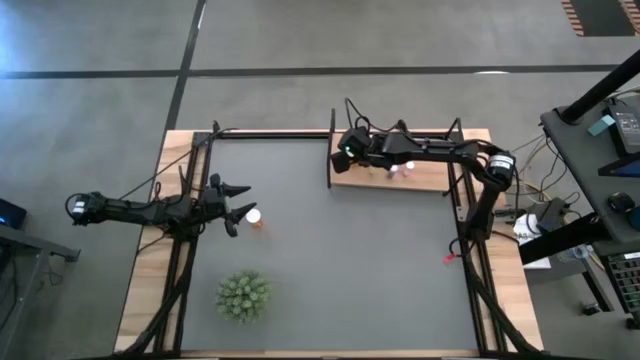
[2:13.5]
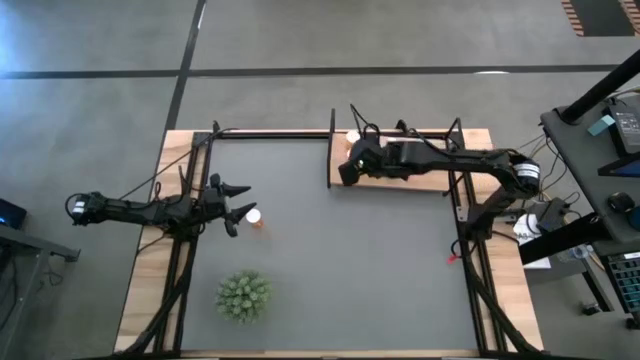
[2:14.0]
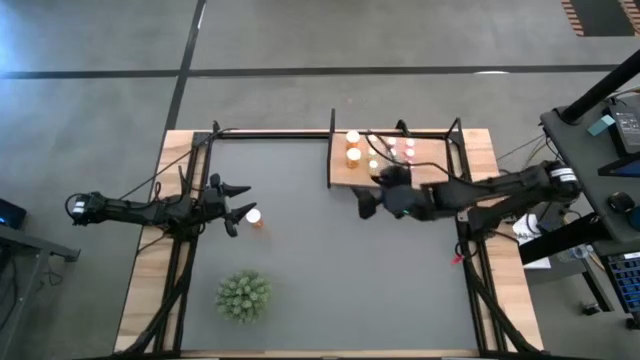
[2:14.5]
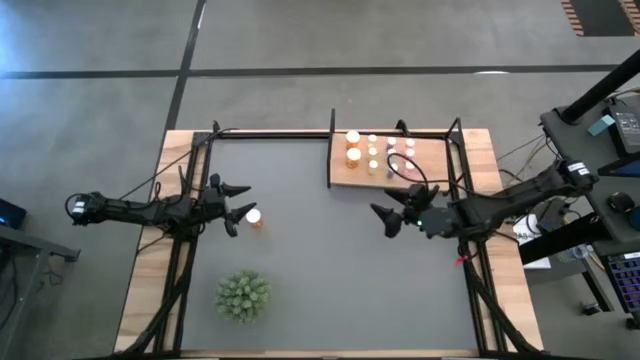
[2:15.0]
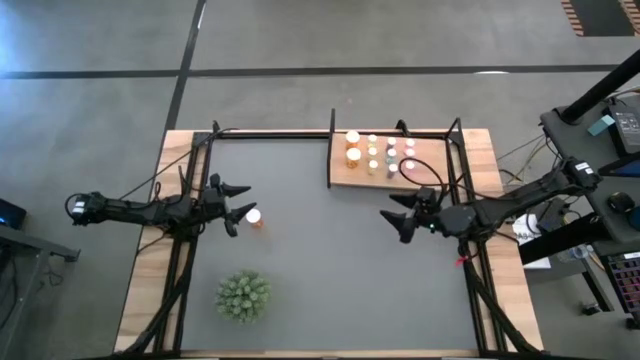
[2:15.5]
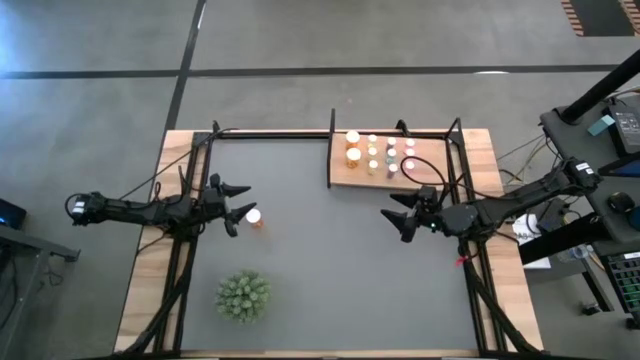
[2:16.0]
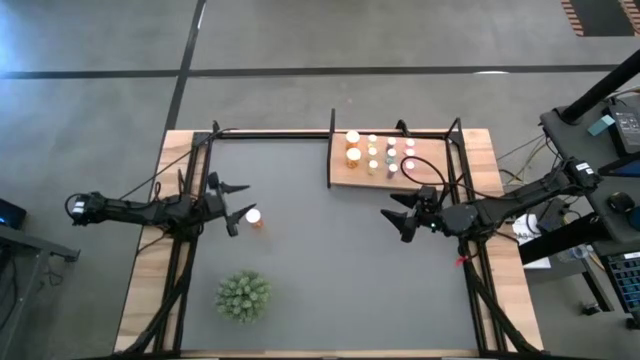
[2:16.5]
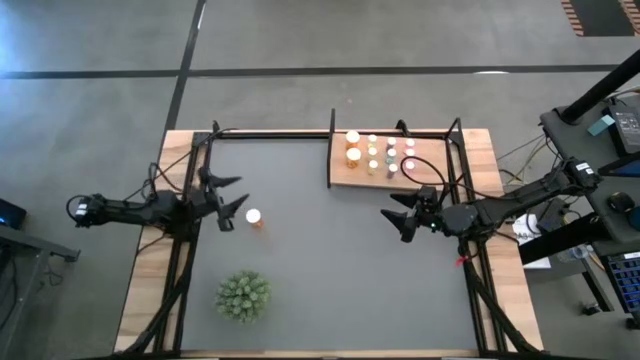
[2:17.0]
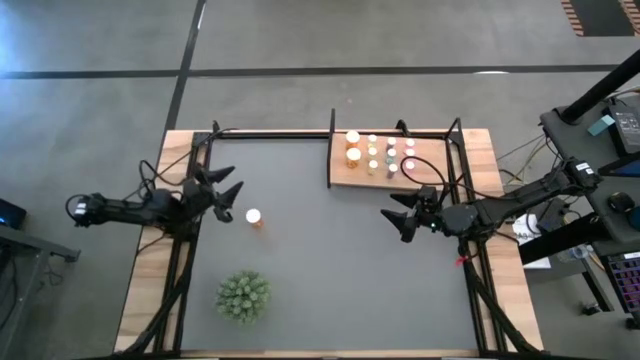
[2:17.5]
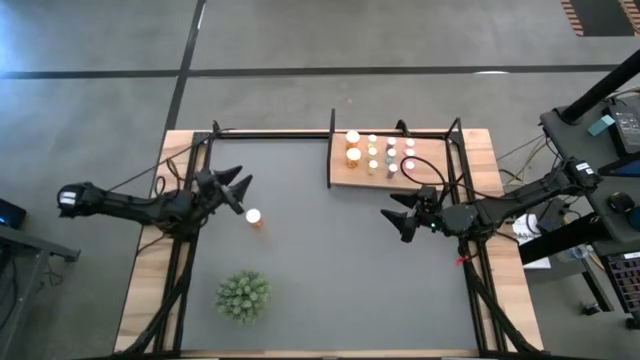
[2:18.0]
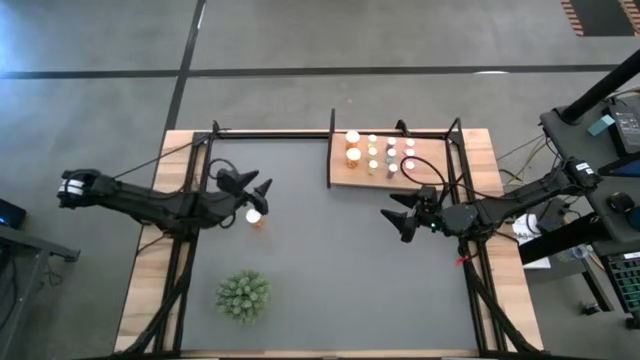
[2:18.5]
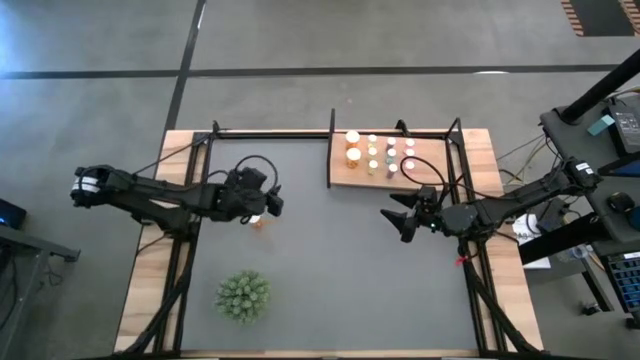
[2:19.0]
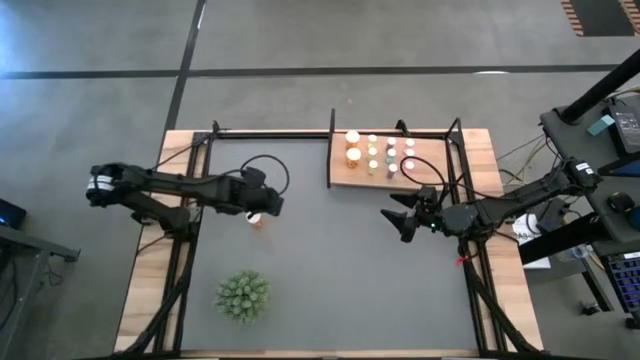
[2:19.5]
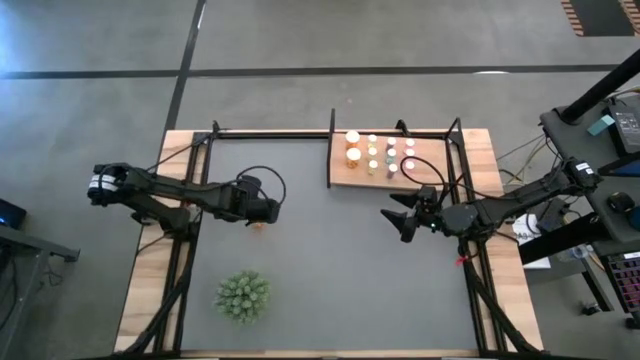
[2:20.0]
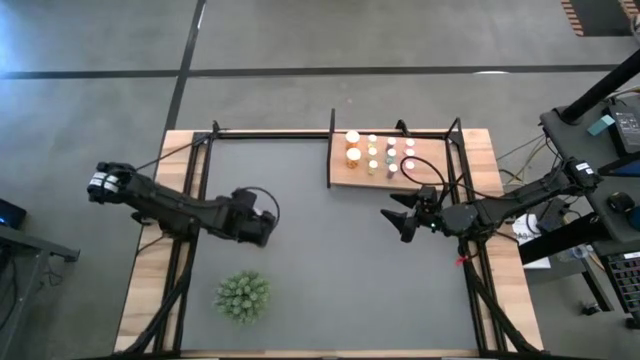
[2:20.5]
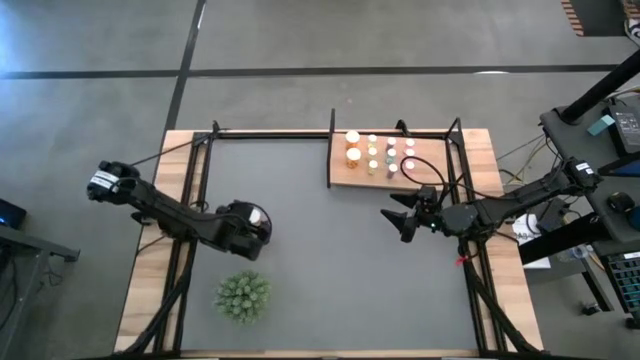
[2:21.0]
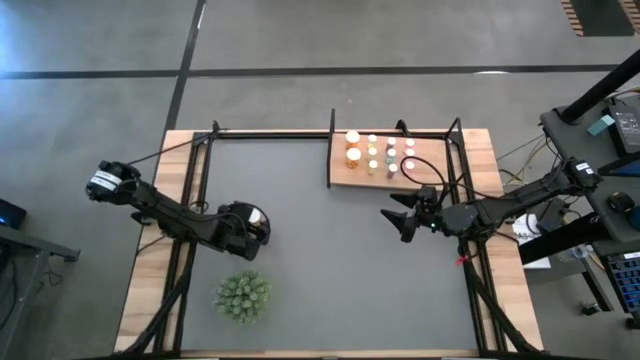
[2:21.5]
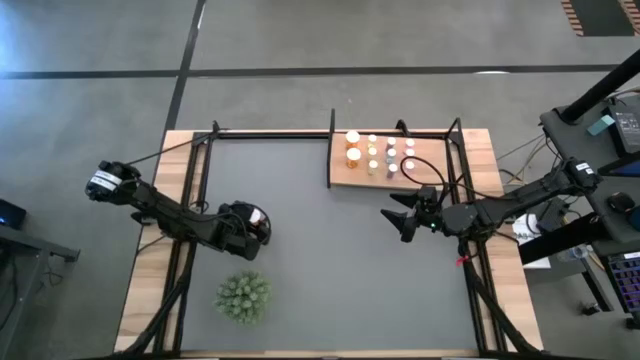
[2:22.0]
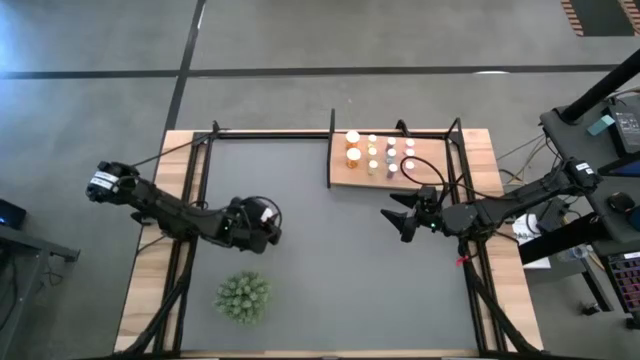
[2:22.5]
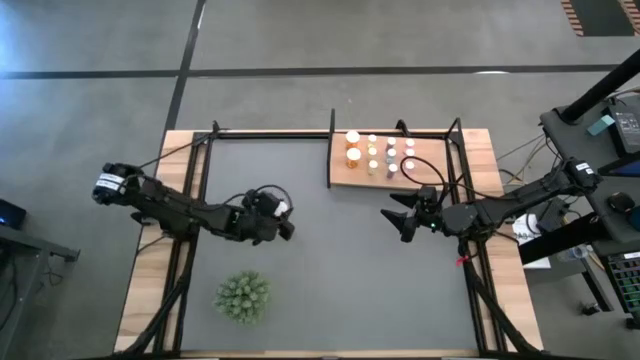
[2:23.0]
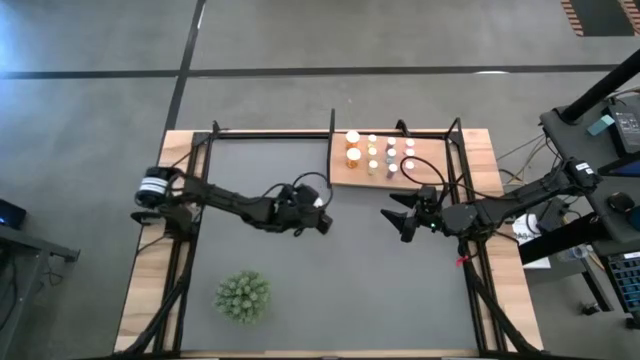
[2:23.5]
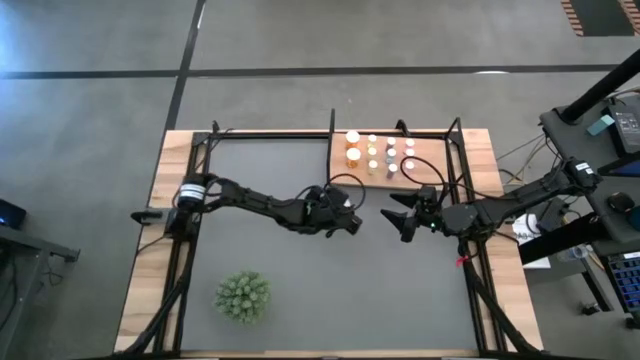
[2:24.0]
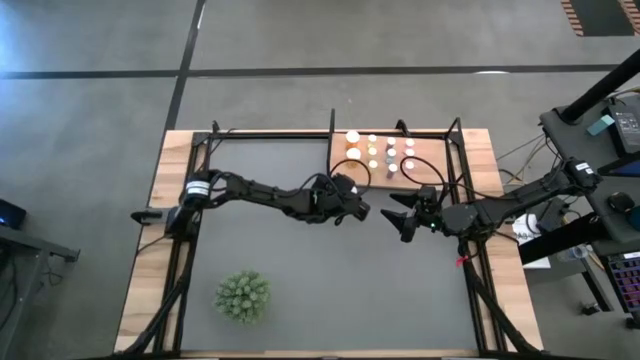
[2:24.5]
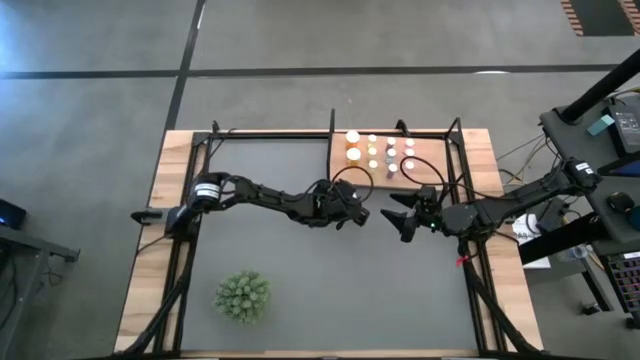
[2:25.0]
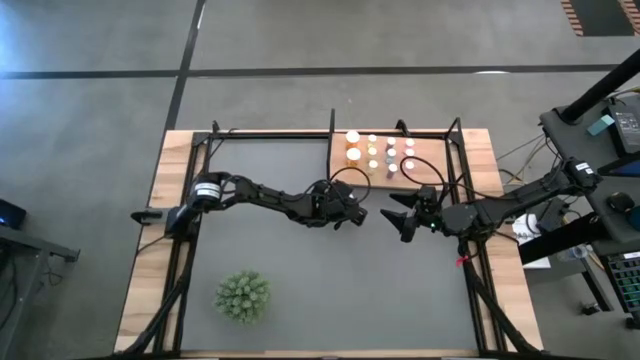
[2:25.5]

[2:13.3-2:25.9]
Task: Pick and place medicine bottles onto shelf by color
Put the orange pill bottle on the shelf aligned with the other orange pill bottles

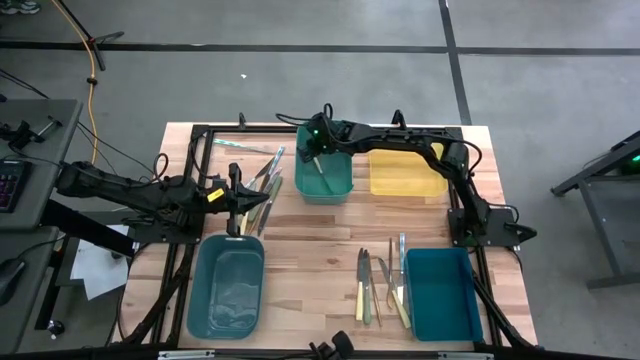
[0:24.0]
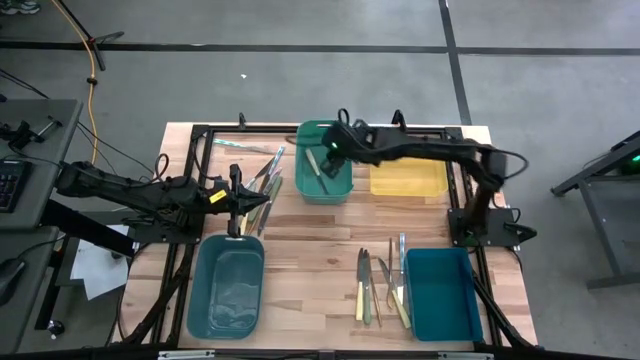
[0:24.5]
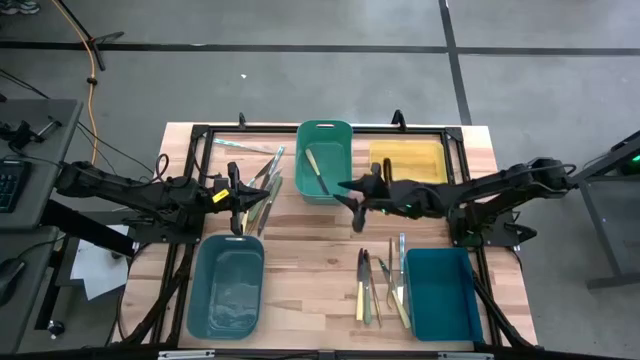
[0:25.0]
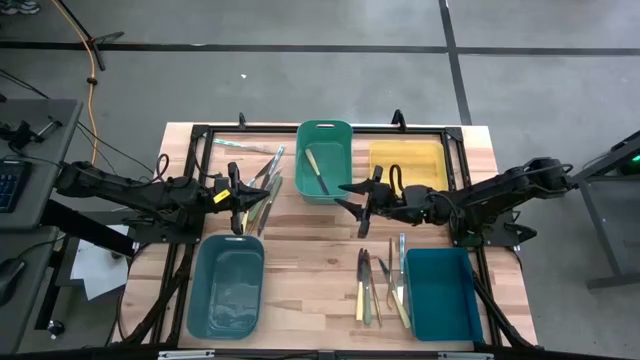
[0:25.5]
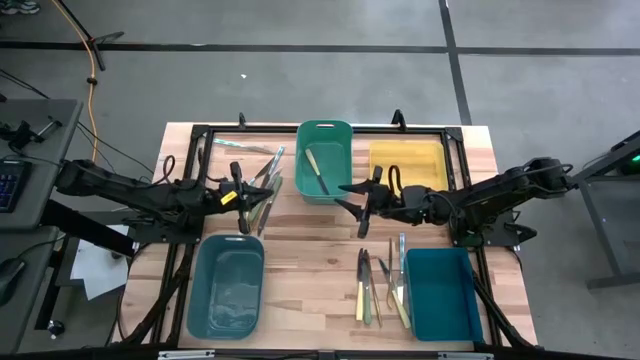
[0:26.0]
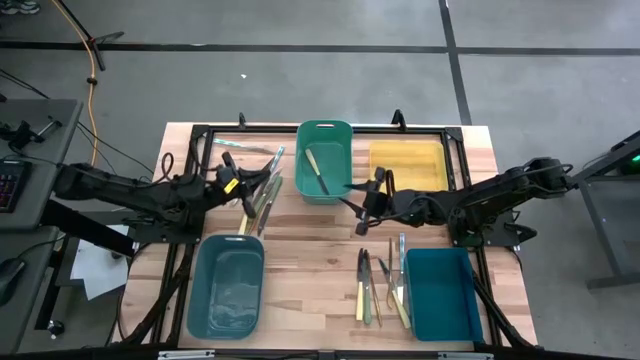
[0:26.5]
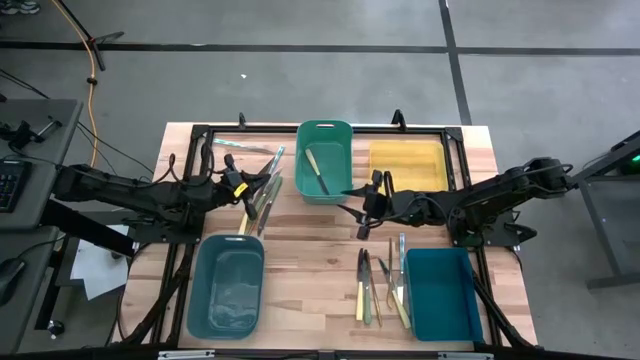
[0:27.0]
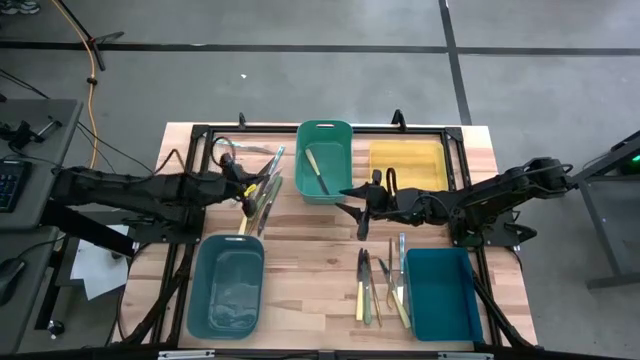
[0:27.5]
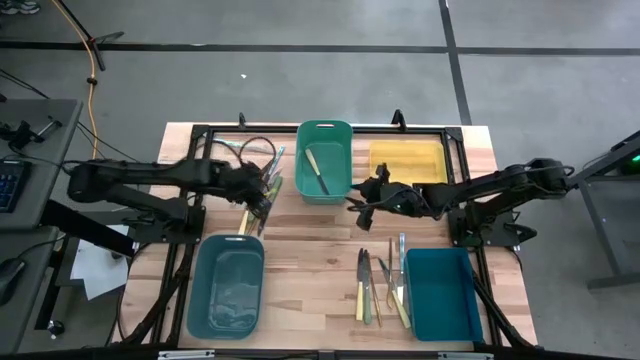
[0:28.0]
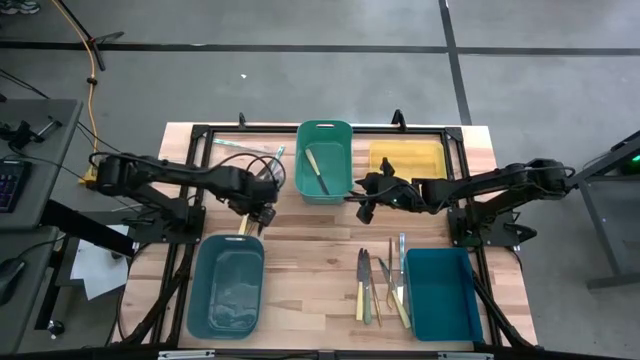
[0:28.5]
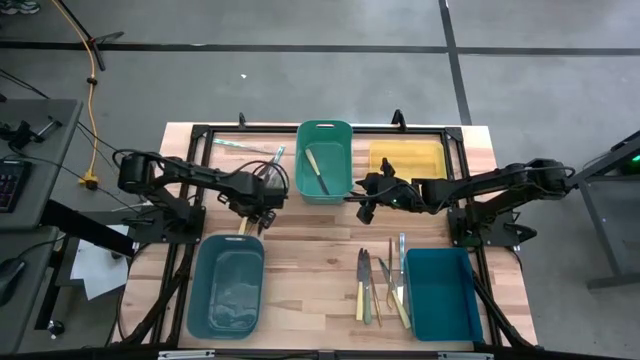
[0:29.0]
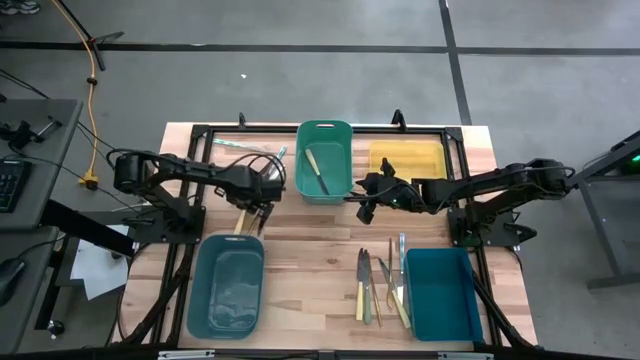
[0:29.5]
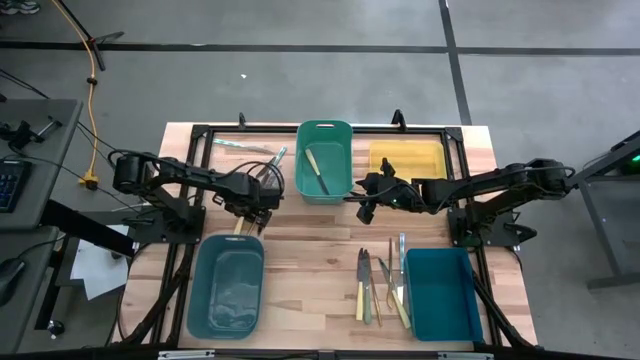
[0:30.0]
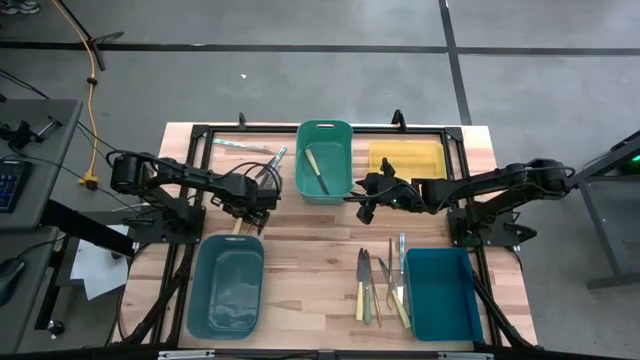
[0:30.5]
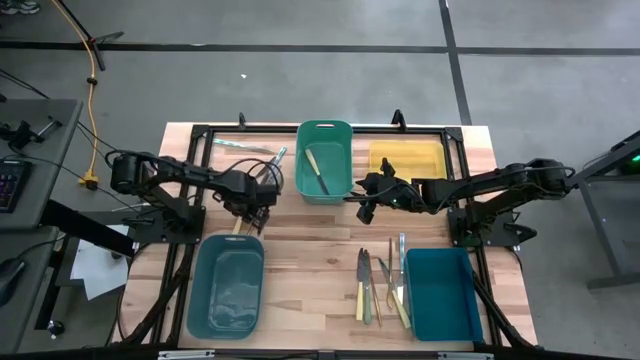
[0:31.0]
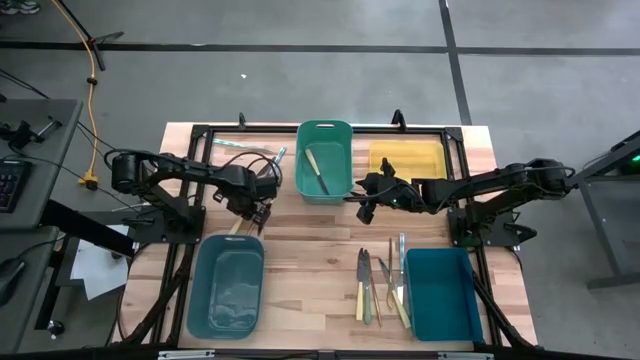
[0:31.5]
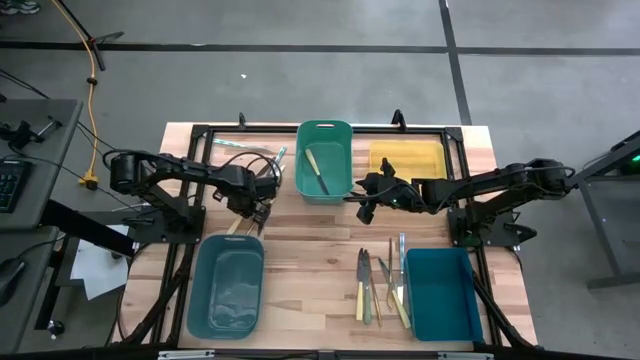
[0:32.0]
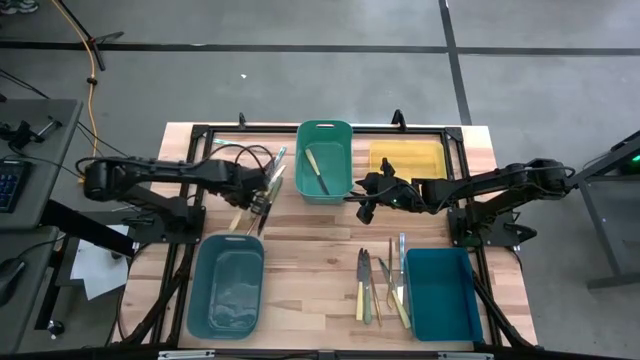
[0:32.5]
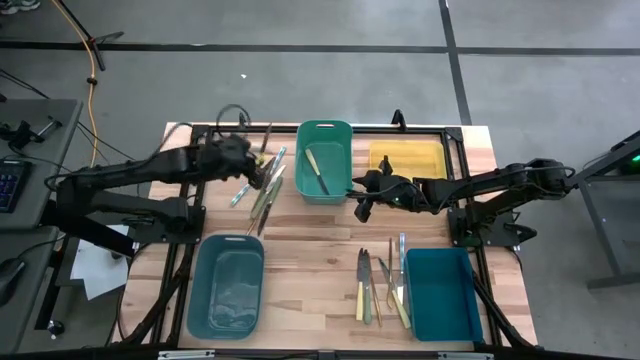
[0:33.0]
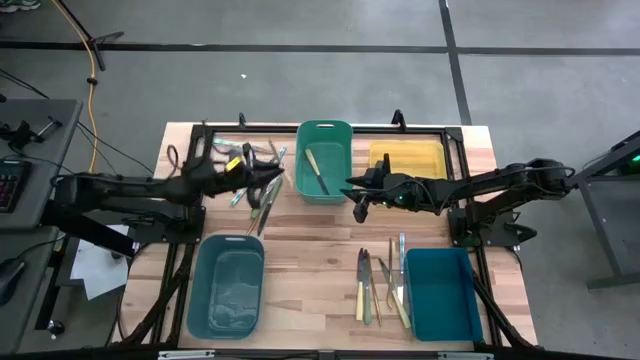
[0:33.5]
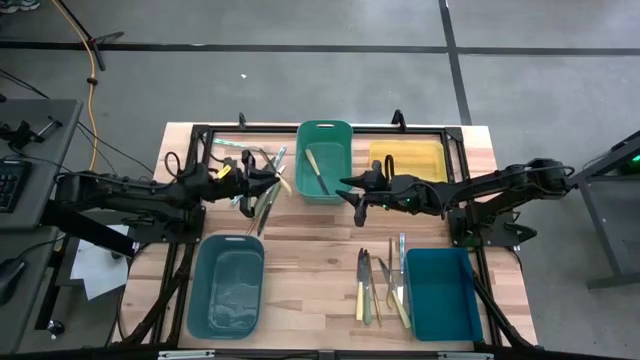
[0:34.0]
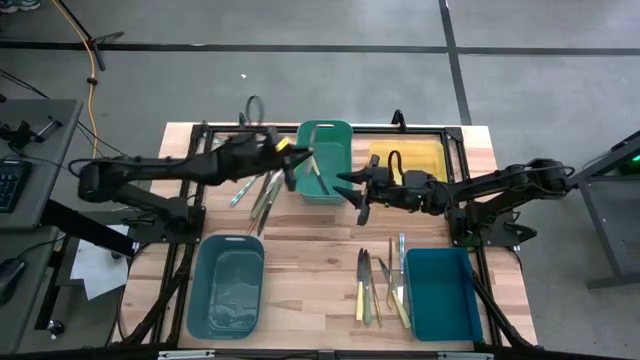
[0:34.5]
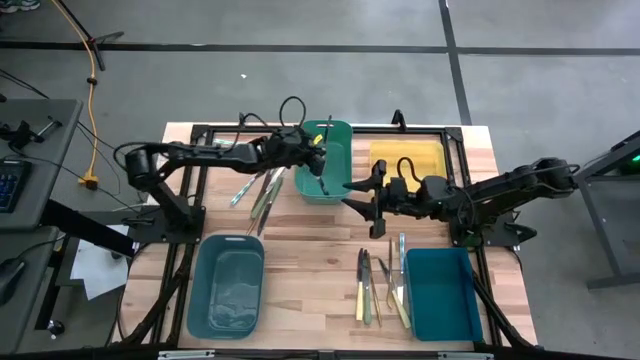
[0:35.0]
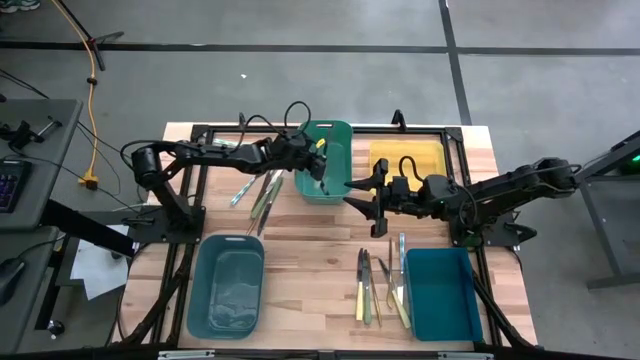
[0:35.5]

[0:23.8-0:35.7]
Task: Sort silverware by color (type)
Put the yellow knife into the green bin
